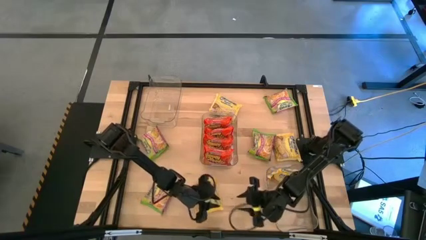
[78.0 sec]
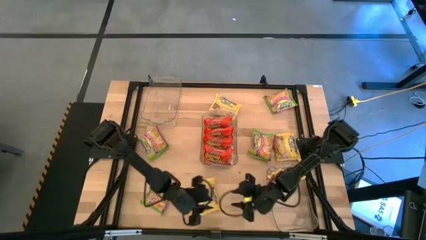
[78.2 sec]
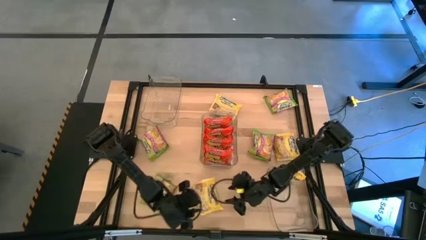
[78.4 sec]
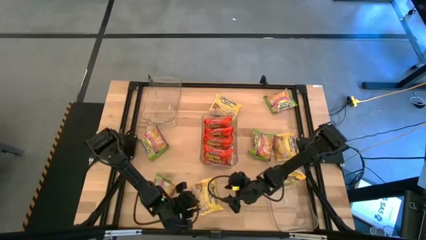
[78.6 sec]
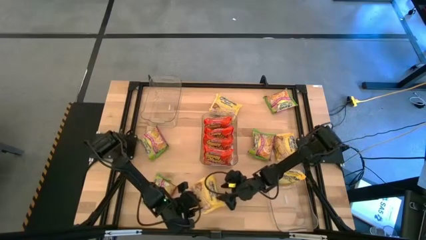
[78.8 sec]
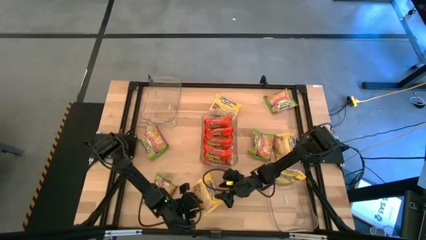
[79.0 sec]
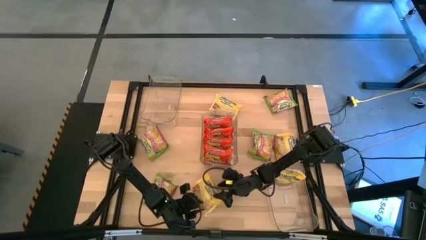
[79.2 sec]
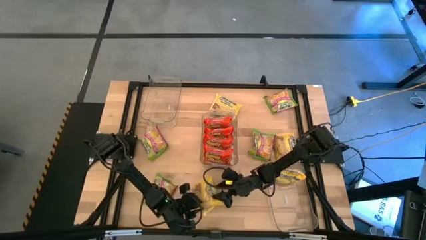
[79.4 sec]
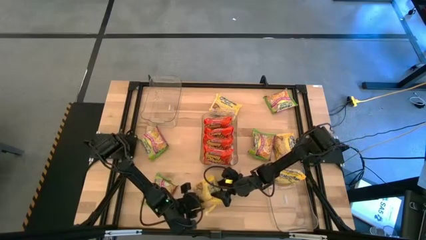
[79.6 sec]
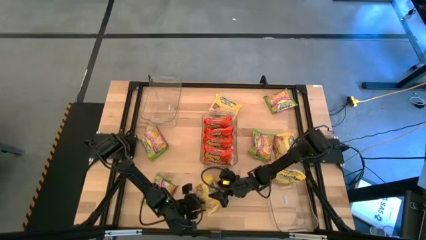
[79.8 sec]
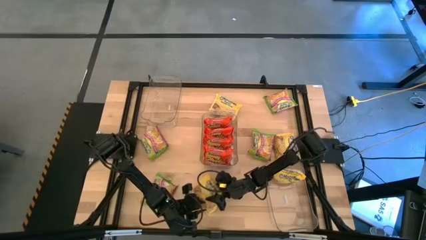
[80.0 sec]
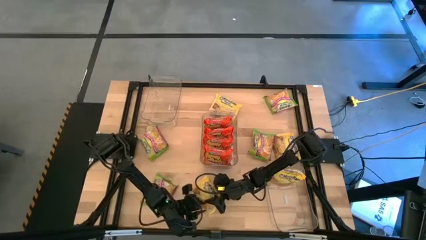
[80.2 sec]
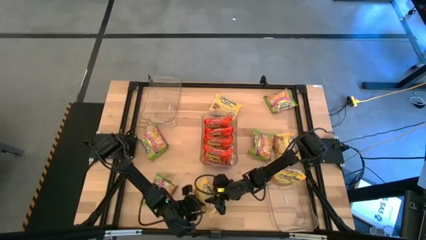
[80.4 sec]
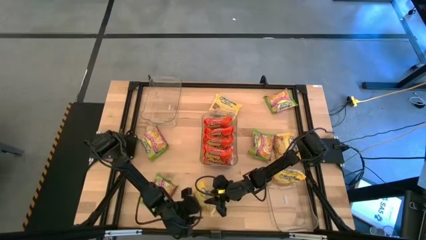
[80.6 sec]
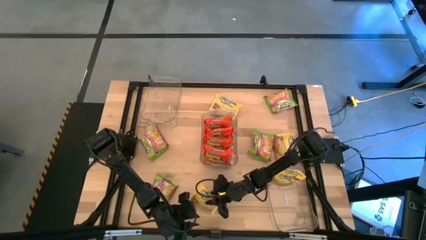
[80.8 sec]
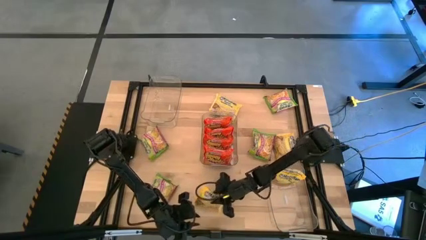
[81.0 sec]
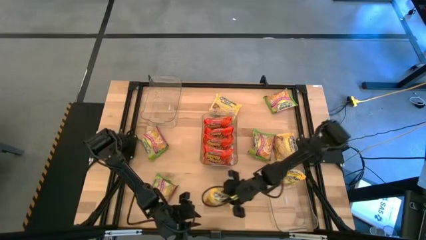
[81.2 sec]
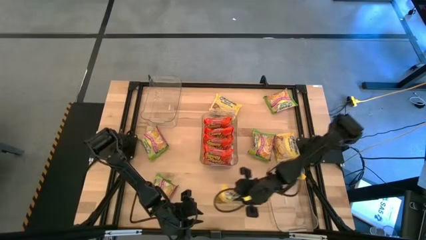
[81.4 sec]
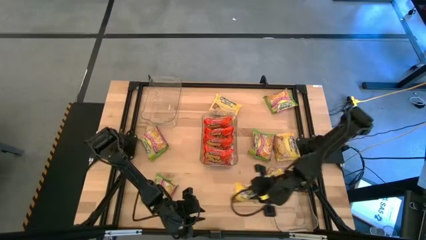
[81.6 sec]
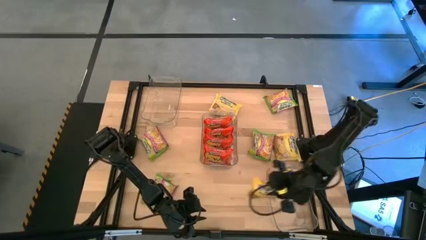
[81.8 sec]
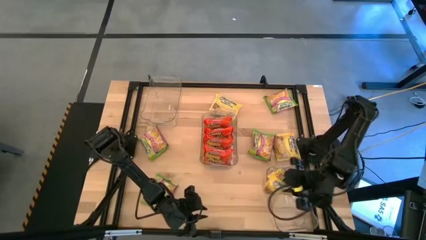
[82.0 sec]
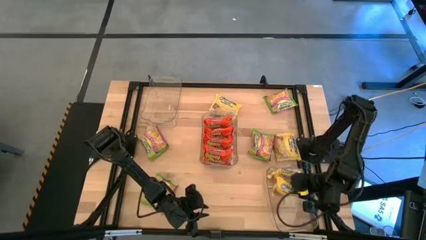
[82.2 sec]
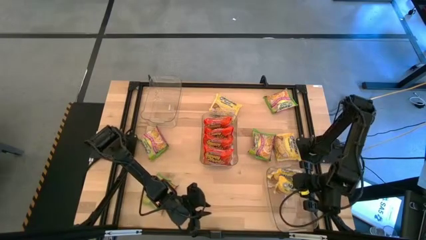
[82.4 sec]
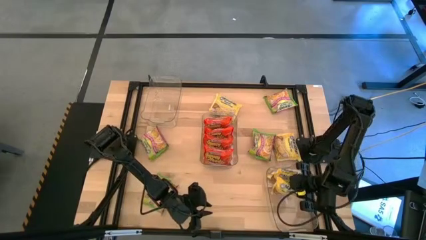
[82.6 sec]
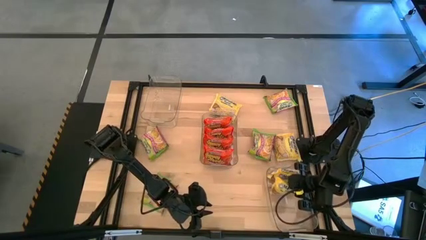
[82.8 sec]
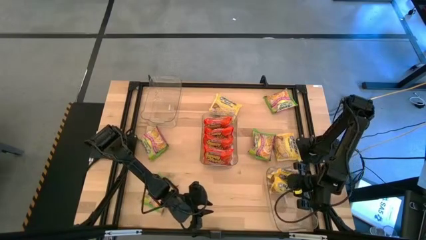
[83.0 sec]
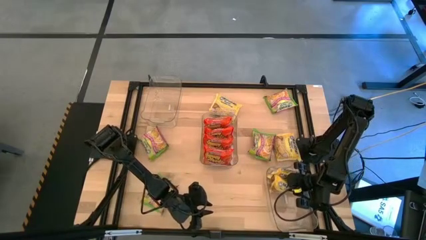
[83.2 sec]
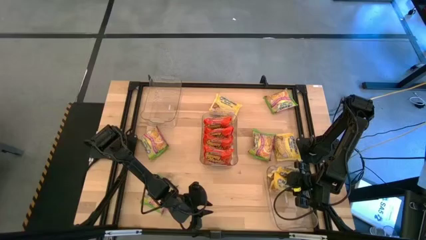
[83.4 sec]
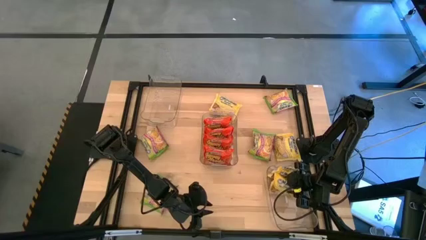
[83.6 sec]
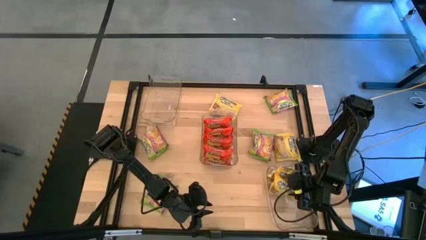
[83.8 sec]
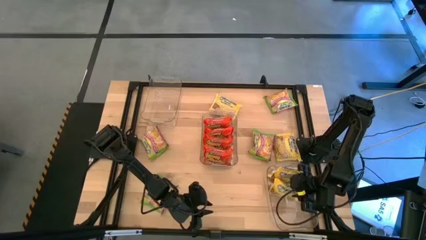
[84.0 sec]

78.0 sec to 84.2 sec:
Task: Sort Maruchan noodles
Put the bottom yellow noodle pack into the bottom transparent bin

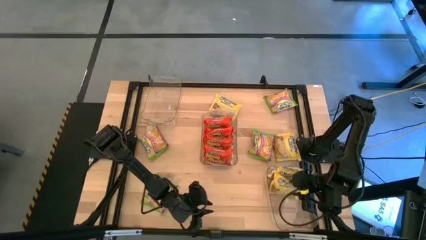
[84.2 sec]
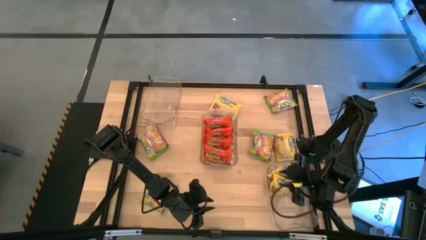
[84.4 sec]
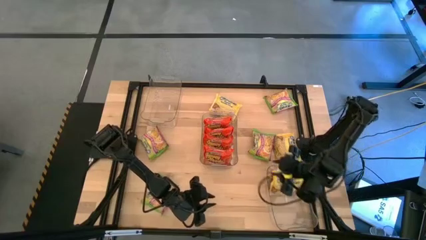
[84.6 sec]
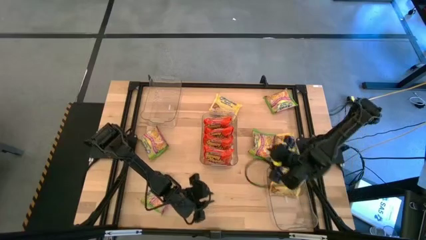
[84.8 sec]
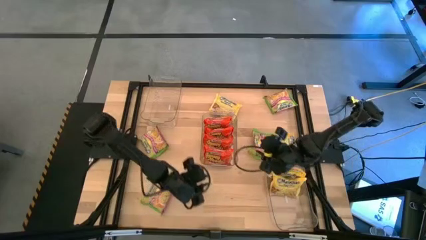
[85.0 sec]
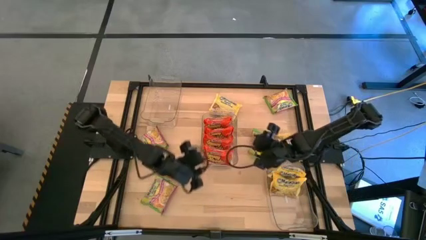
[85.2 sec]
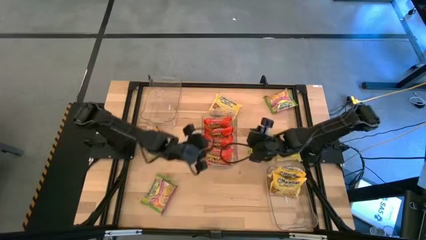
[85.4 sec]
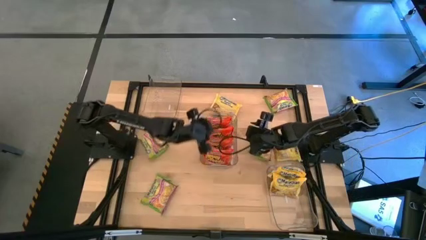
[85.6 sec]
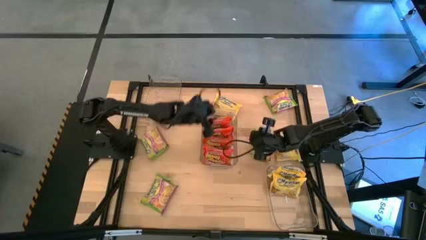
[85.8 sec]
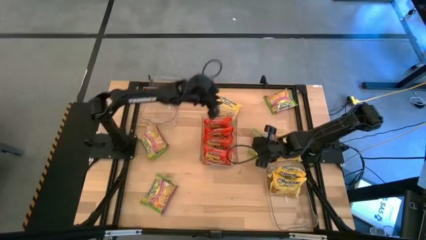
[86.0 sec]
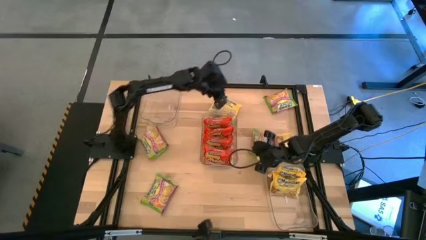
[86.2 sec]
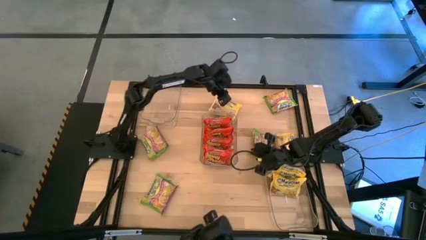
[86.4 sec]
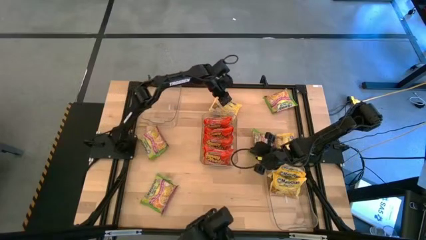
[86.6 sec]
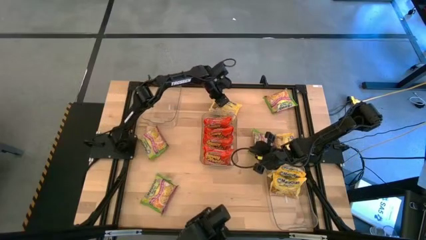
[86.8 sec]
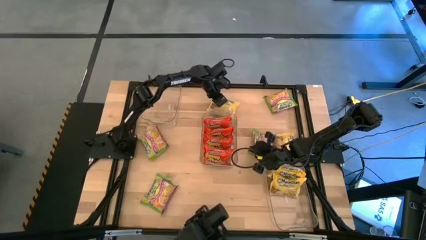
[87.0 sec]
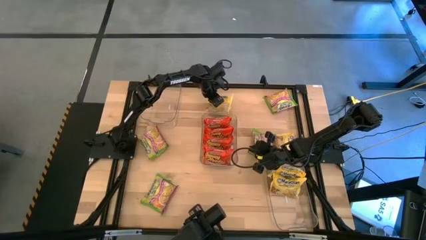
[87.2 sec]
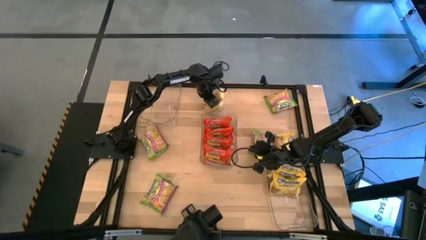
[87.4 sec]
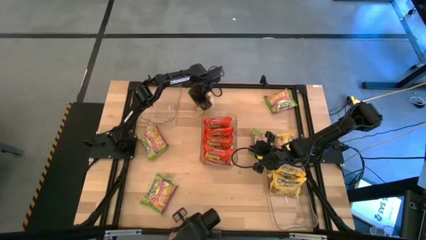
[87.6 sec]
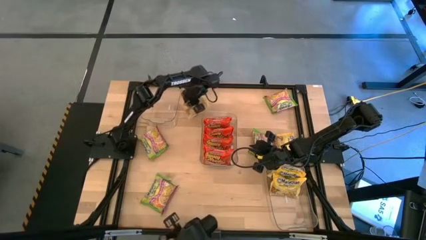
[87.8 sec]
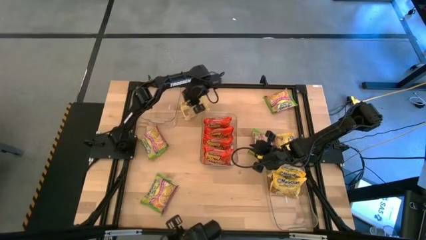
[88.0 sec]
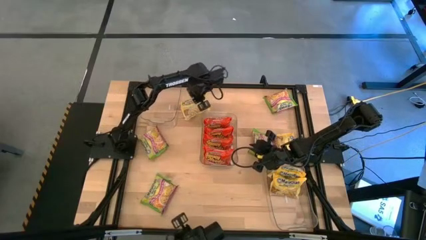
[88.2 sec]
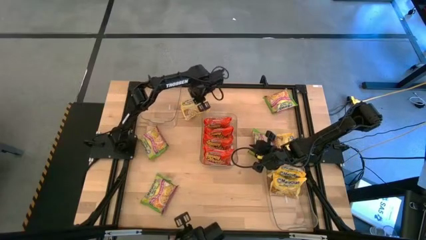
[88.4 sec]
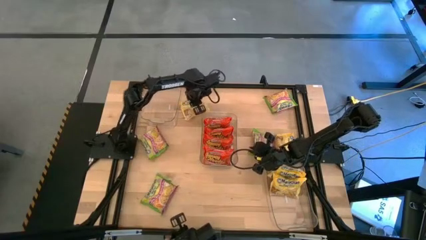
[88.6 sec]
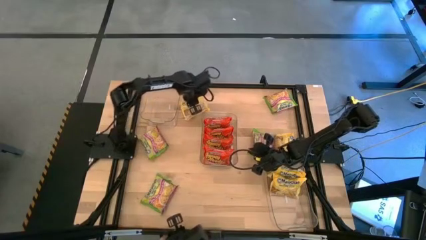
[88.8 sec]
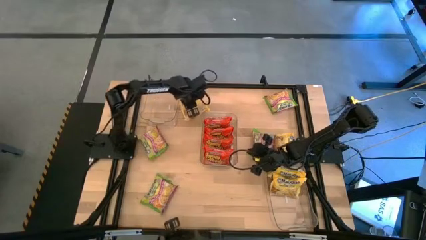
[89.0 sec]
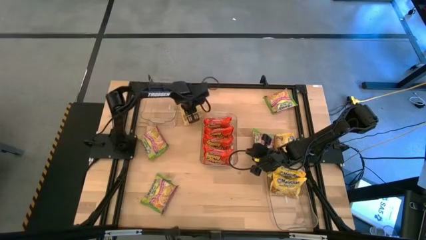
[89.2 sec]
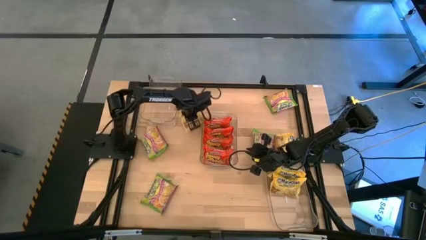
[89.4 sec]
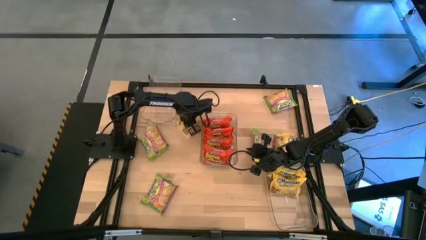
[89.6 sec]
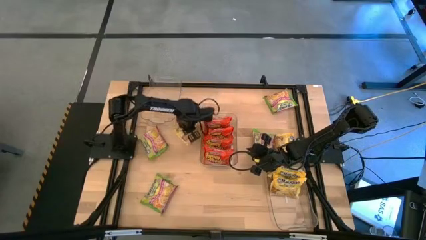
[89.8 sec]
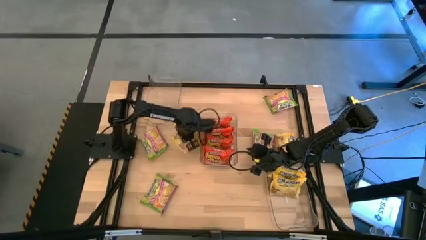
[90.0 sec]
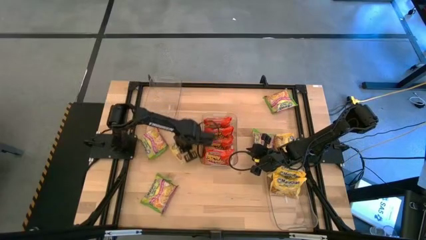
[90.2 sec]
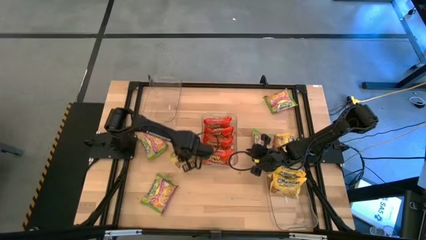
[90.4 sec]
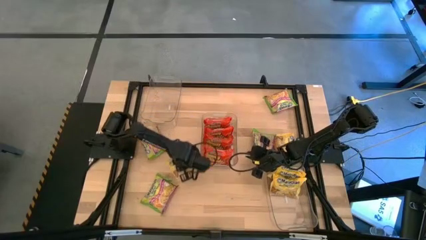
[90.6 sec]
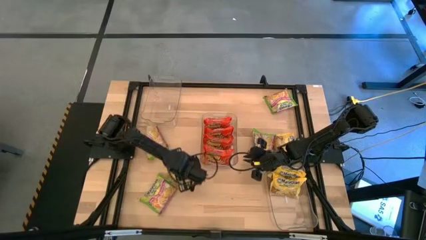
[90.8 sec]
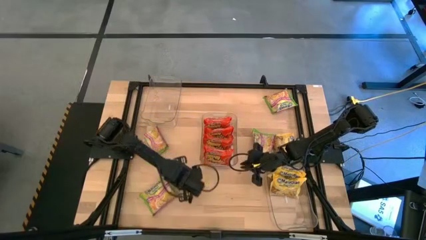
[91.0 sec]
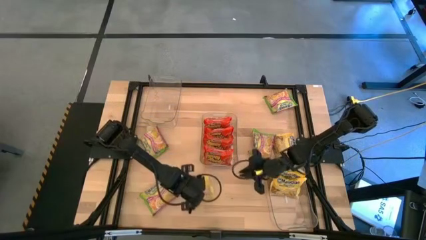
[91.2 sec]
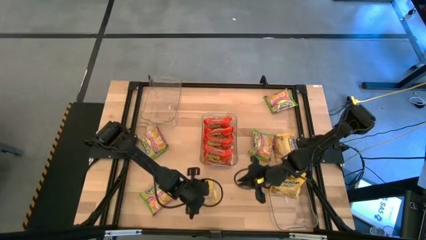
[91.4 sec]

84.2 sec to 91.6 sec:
Move the yellow noodle pack on the table
